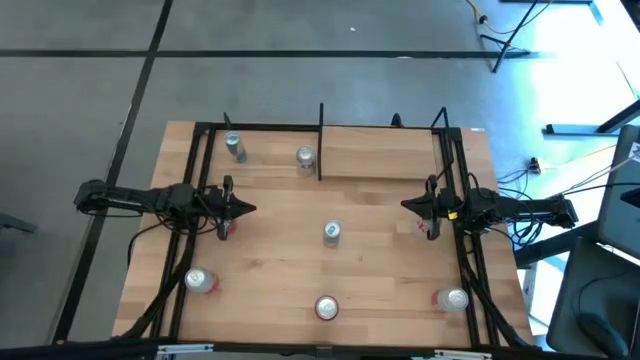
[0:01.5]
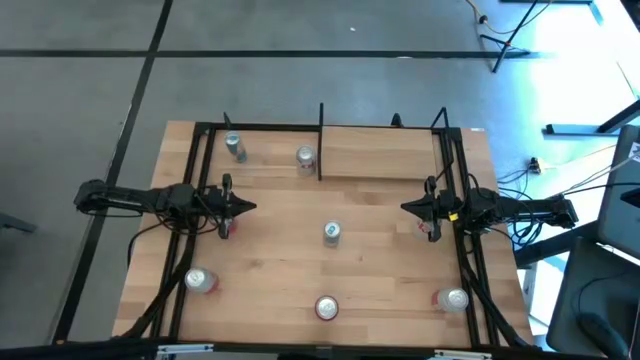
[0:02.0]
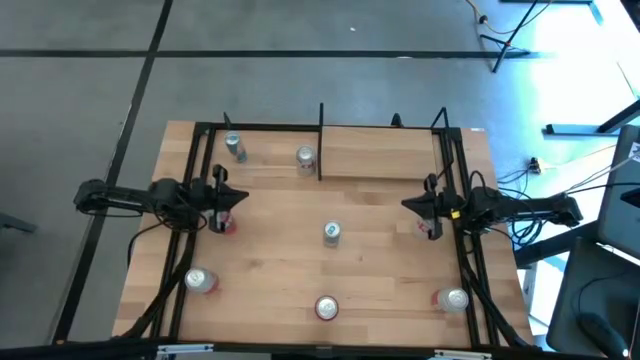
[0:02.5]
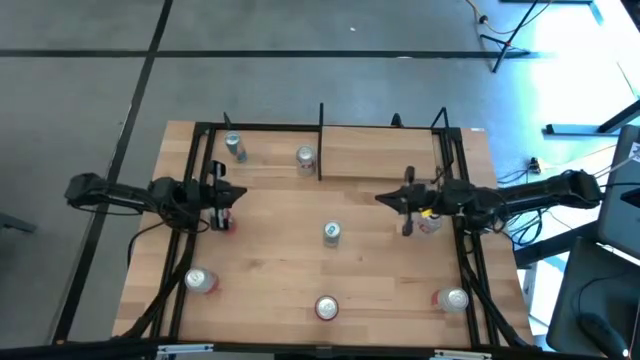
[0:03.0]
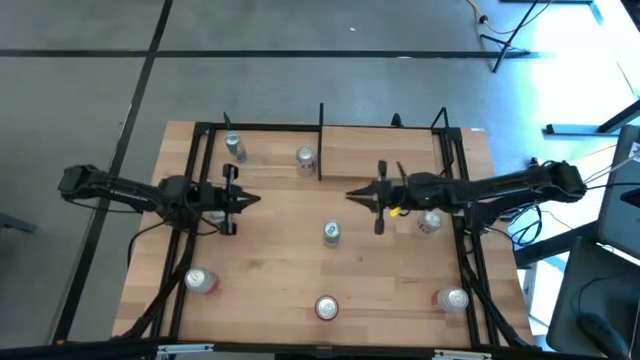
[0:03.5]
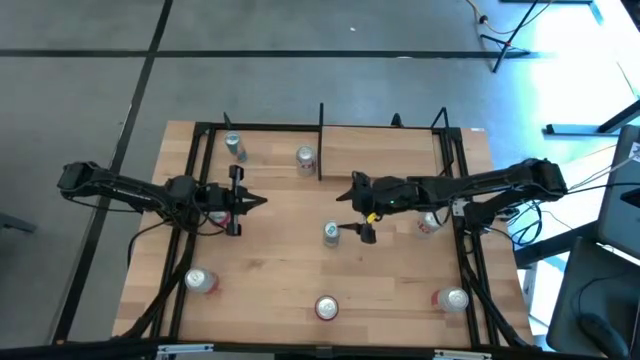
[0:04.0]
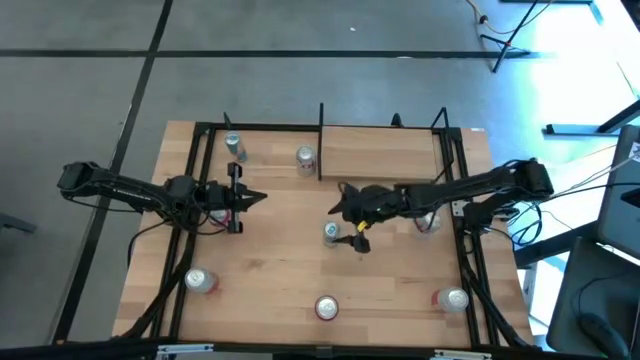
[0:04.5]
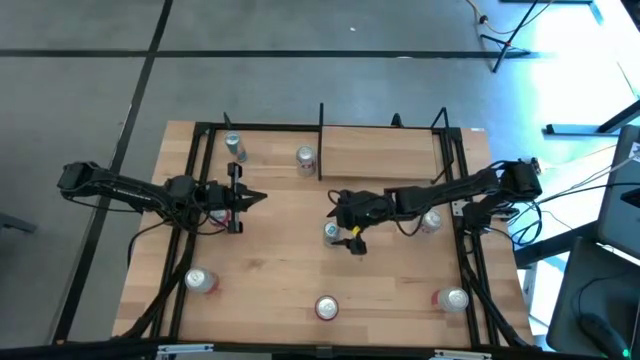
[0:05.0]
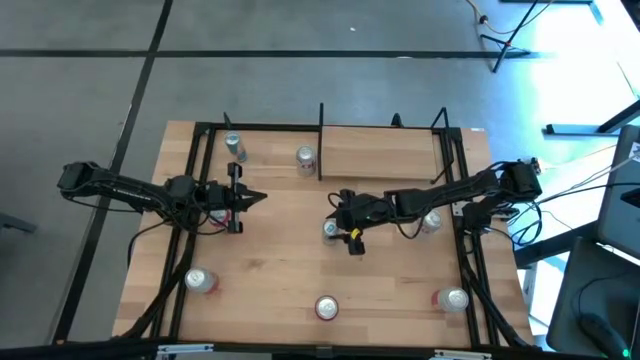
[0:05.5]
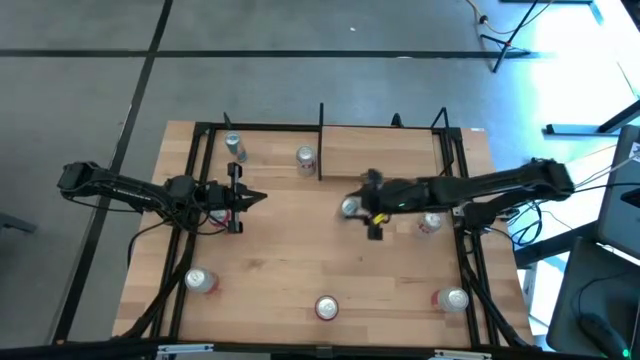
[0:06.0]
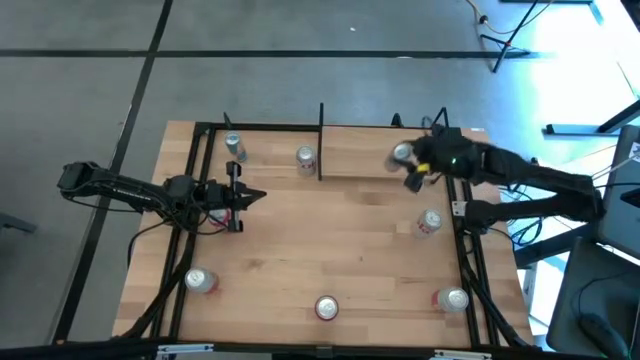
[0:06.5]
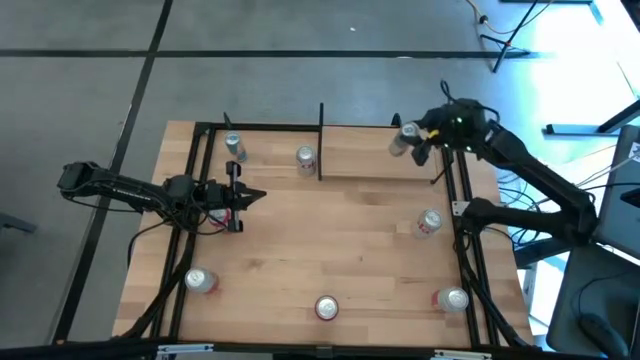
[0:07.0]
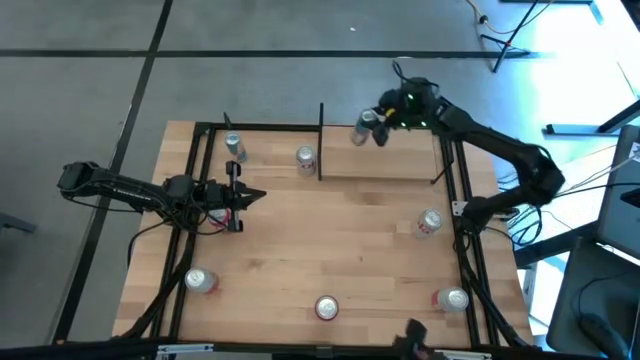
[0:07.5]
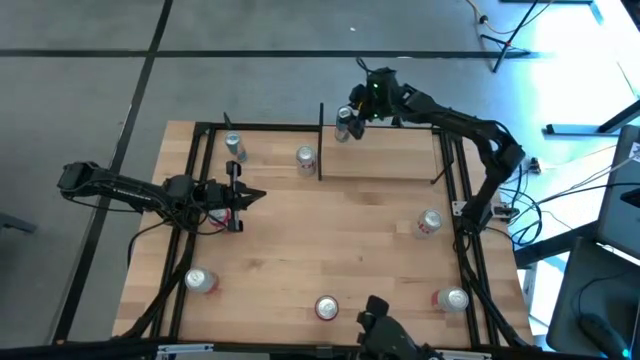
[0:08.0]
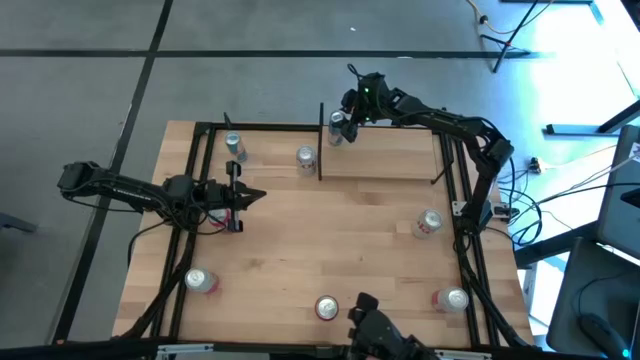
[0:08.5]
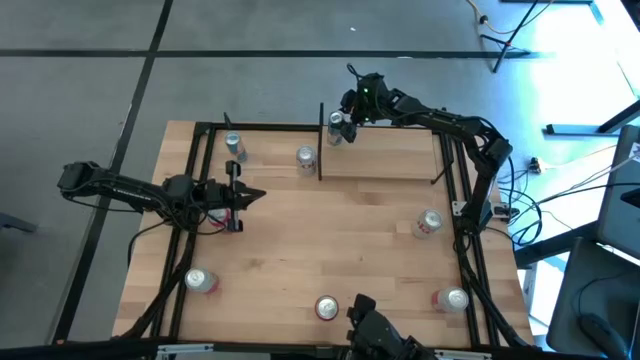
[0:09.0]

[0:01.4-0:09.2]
Task: Place canned beverage on shelf
Put the bottom blue soda can on the shelf

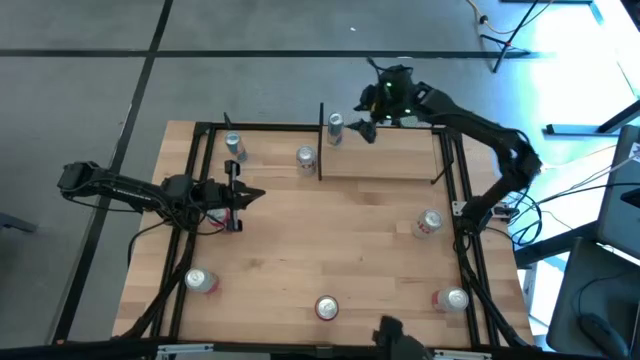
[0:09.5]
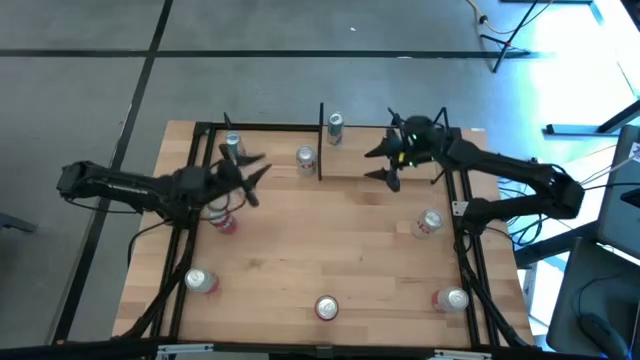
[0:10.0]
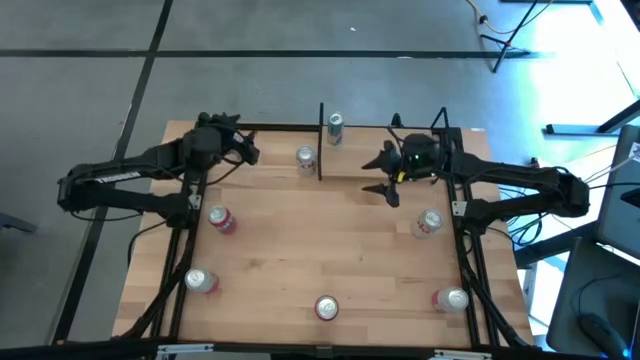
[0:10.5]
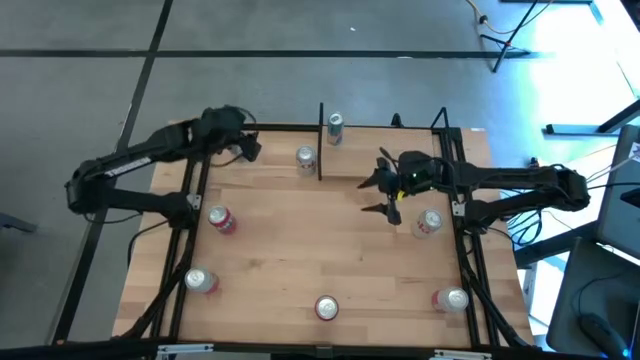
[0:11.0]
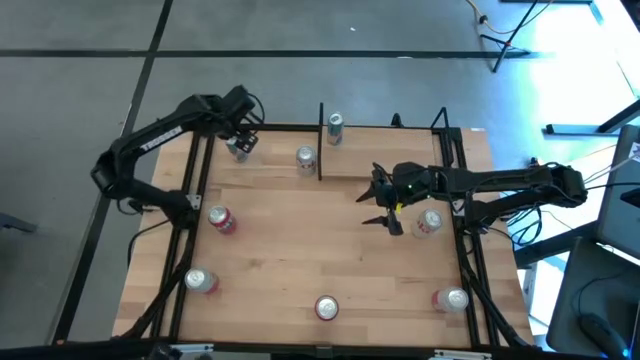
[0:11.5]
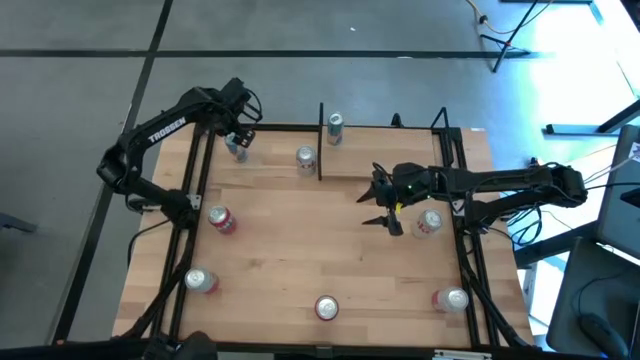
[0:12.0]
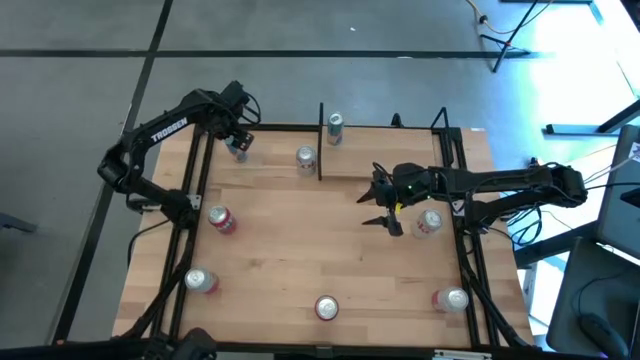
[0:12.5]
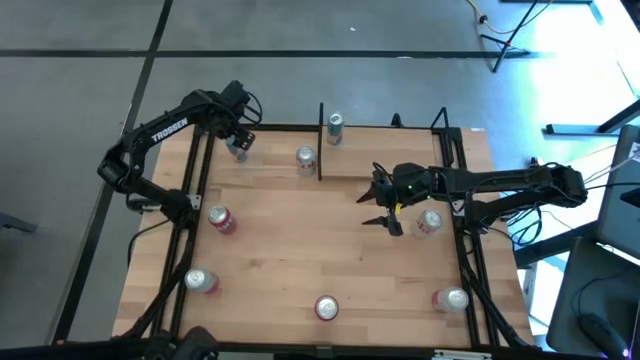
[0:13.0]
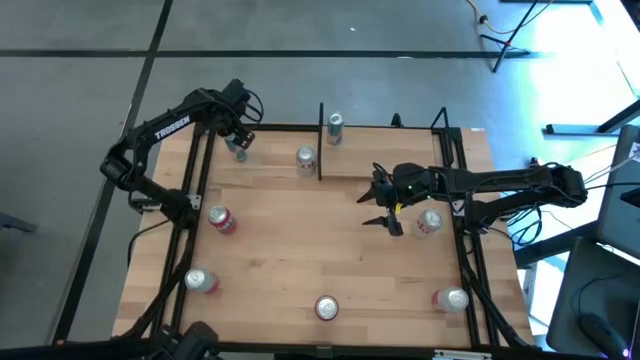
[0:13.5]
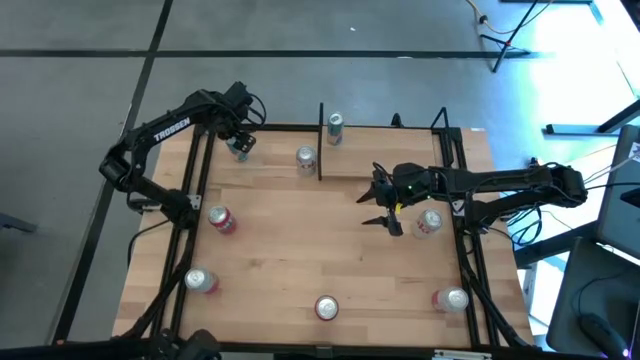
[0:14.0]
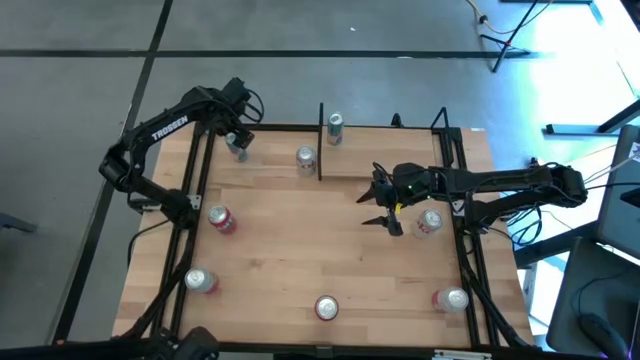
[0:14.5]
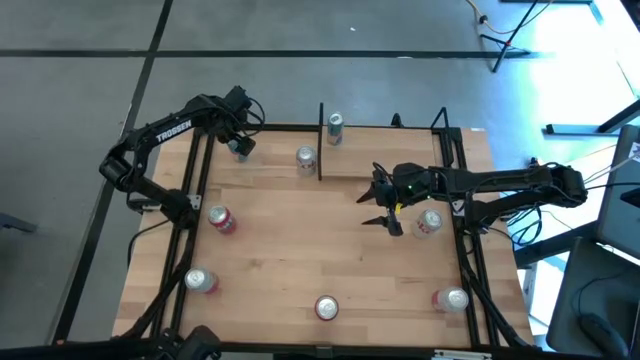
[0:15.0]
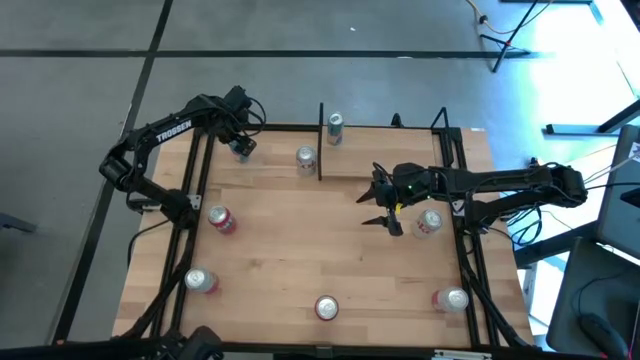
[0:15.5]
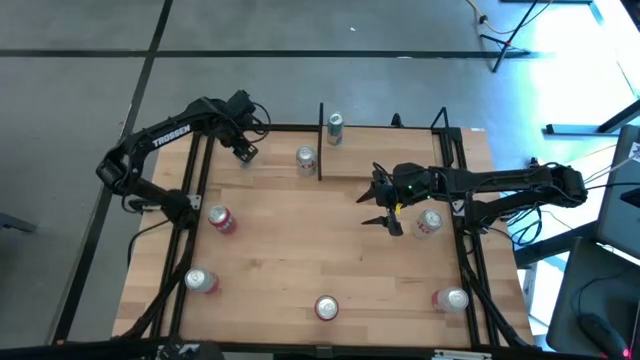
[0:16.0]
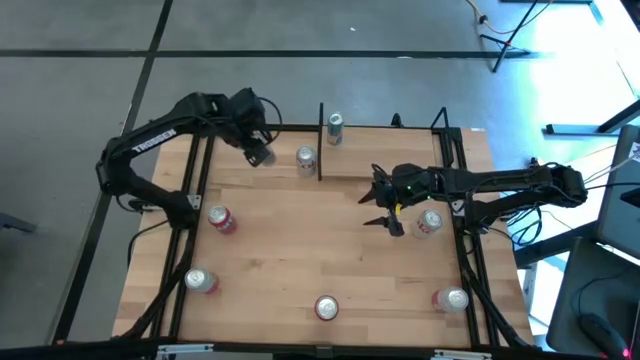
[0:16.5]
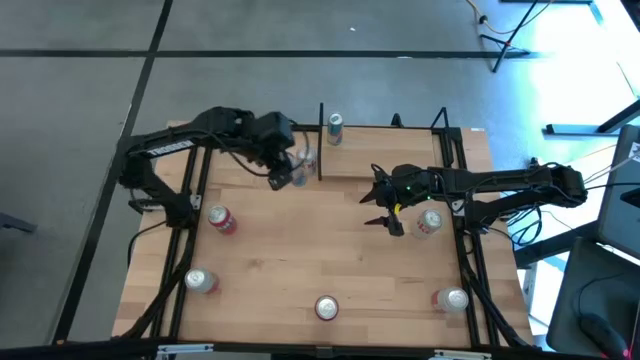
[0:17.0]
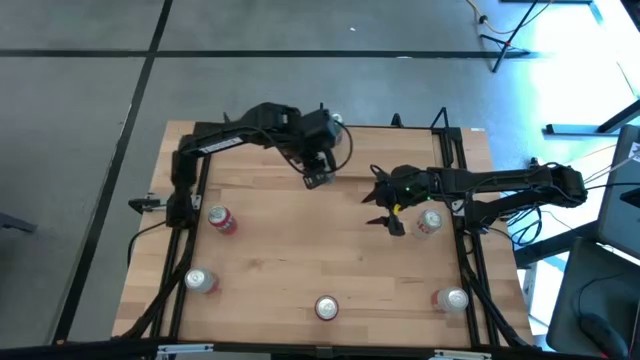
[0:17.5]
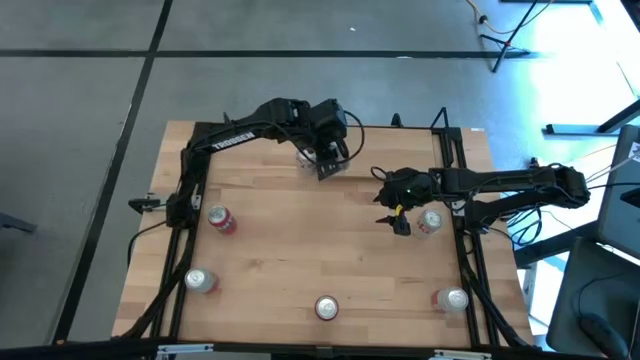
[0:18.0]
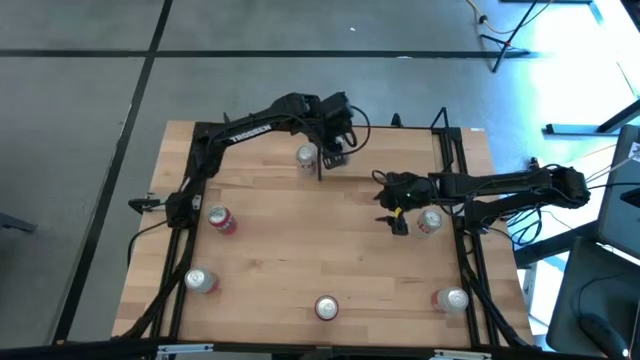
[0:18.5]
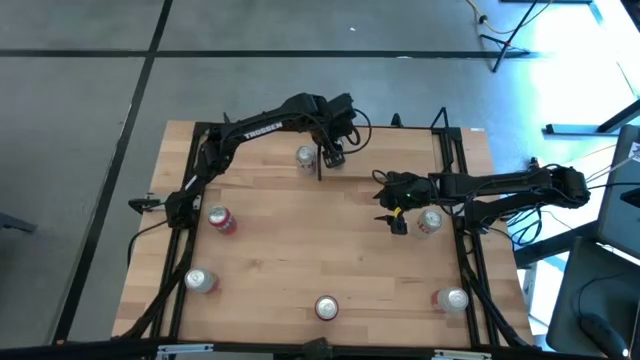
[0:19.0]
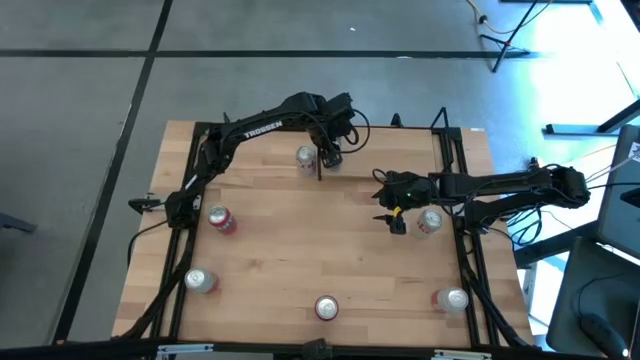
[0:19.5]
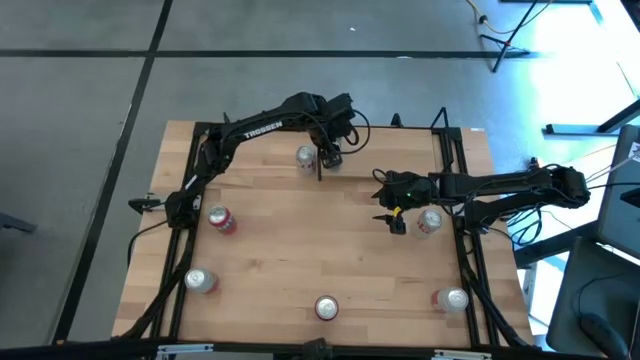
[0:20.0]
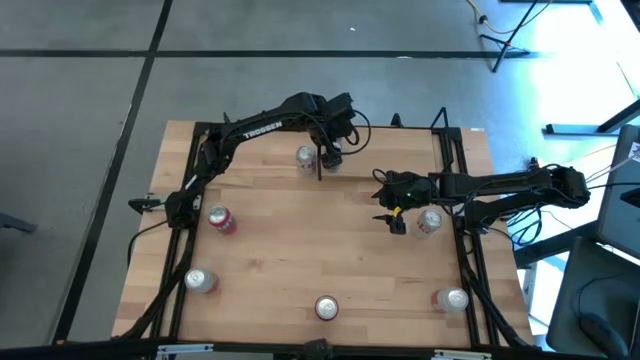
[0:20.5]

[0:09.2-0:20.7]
Put the blue soda can aligned with the other blue soda can on the shelf
